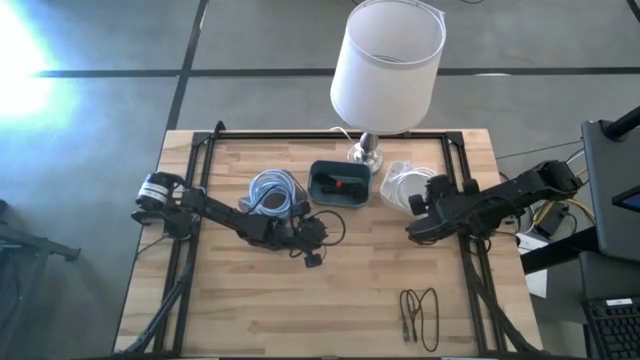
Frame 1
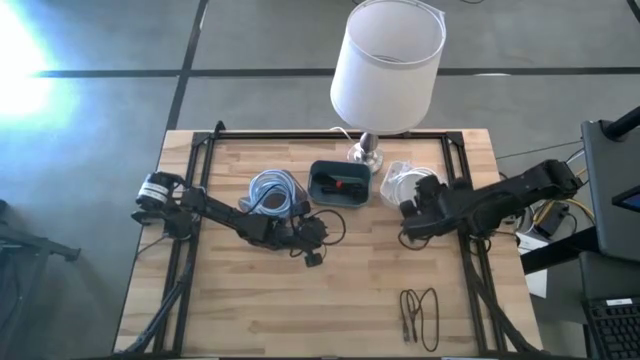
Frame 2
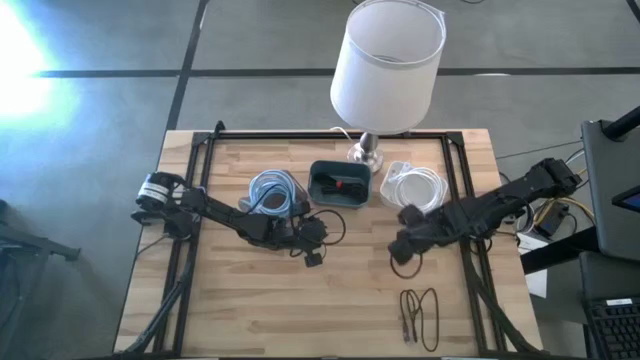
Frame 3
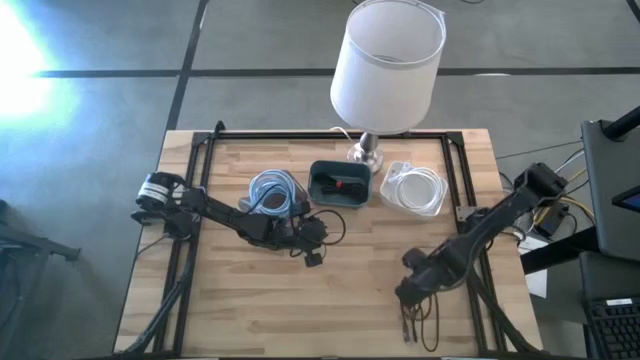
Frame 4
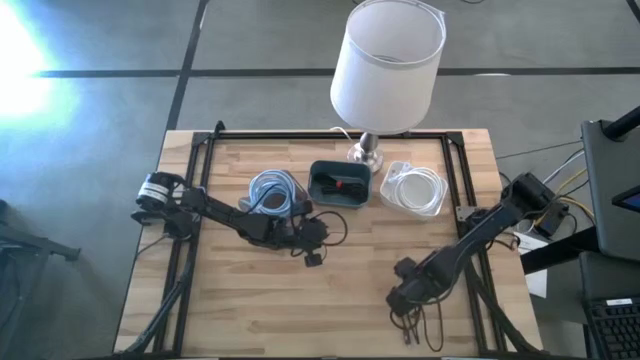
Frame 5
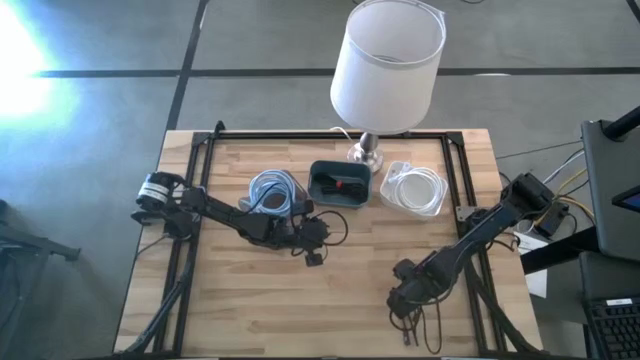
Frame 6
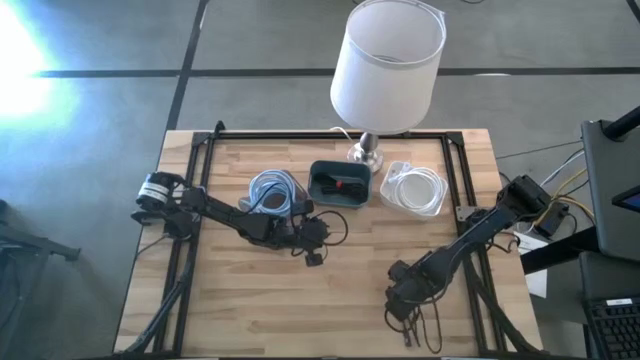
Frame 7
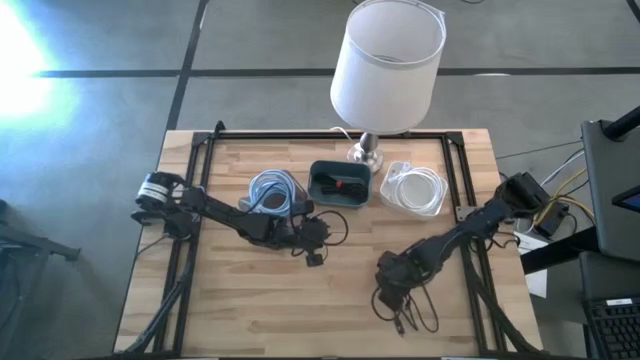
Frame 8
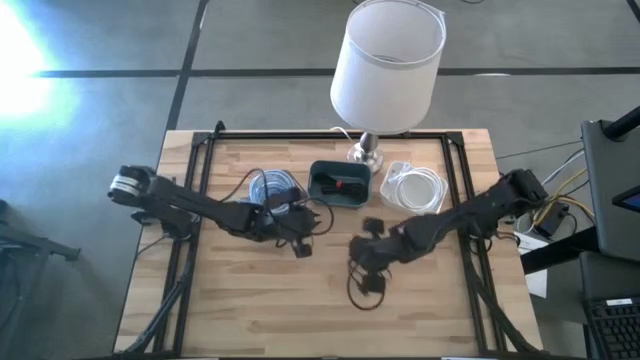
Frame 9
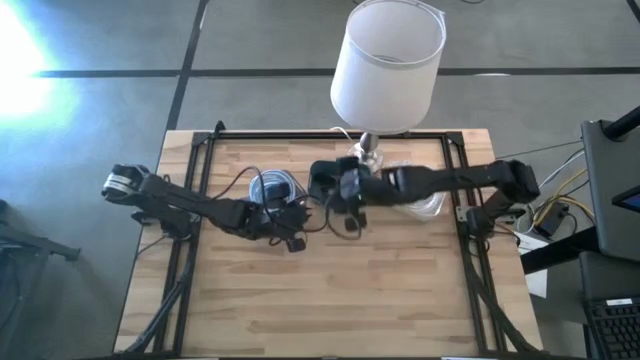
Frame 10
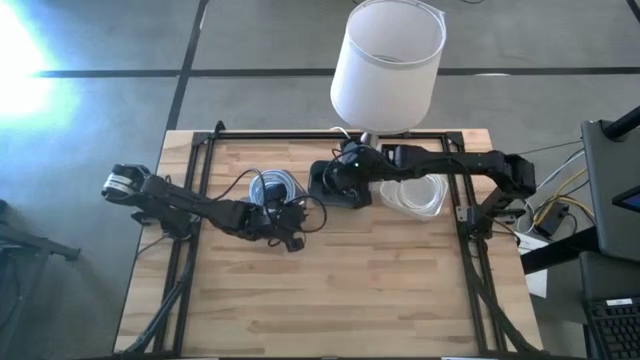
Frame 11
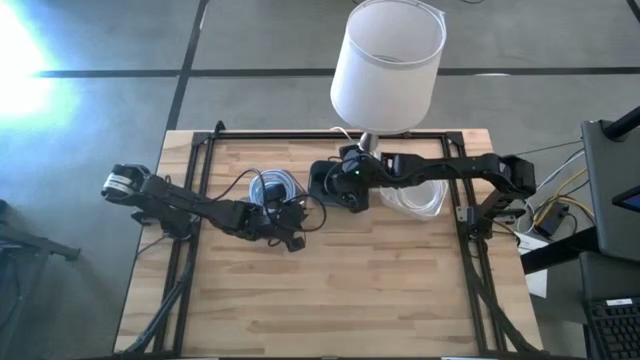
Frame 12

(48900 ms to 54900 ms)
Task: Pick & Place USB Port
Put the black USB cable into the blue bin

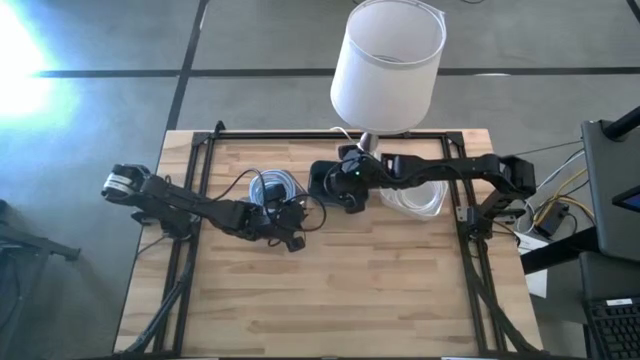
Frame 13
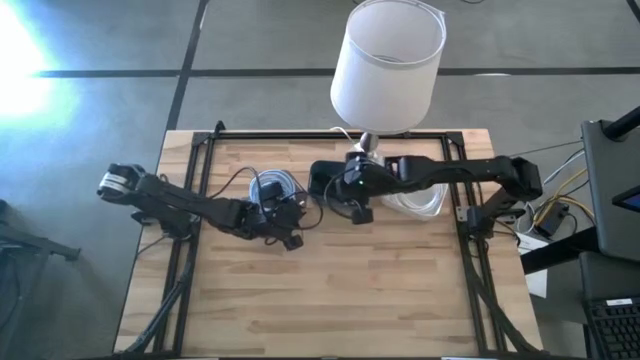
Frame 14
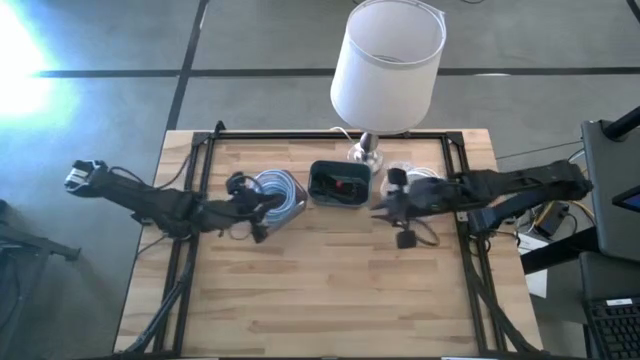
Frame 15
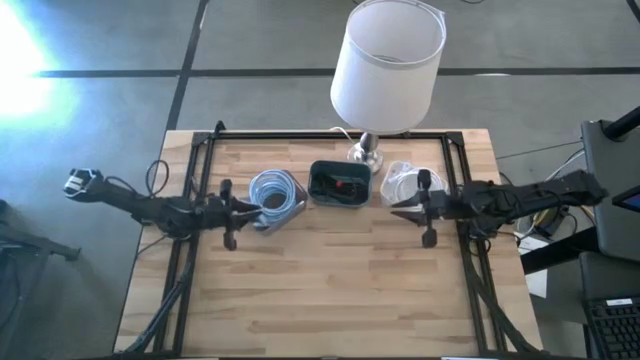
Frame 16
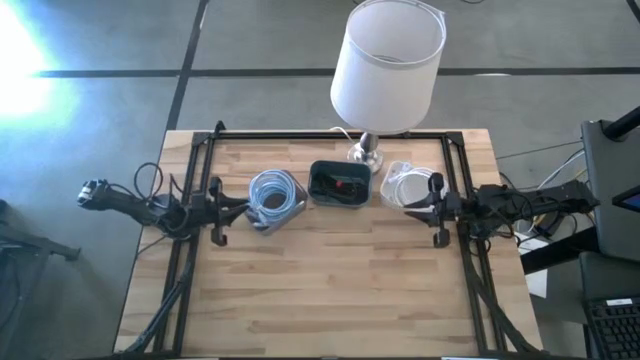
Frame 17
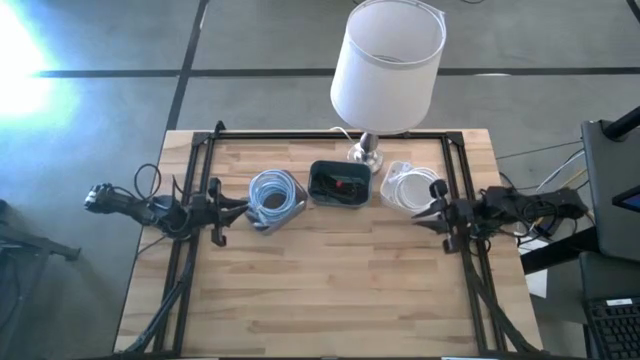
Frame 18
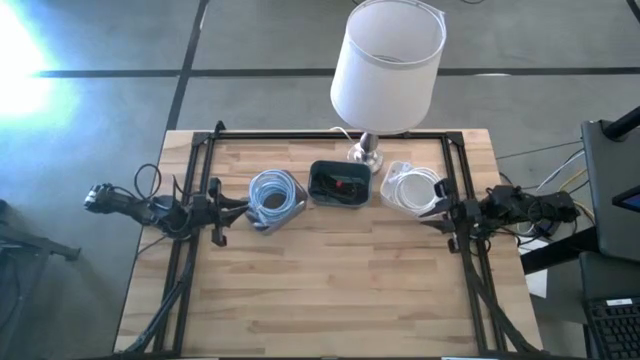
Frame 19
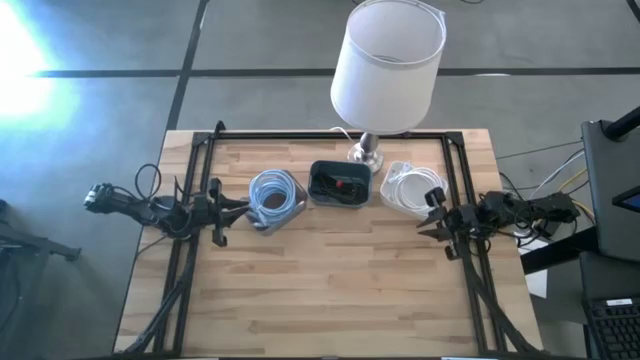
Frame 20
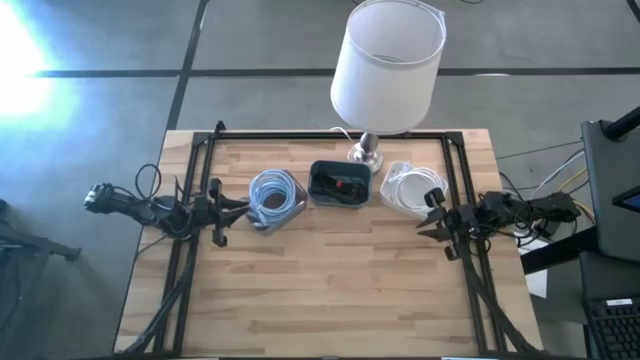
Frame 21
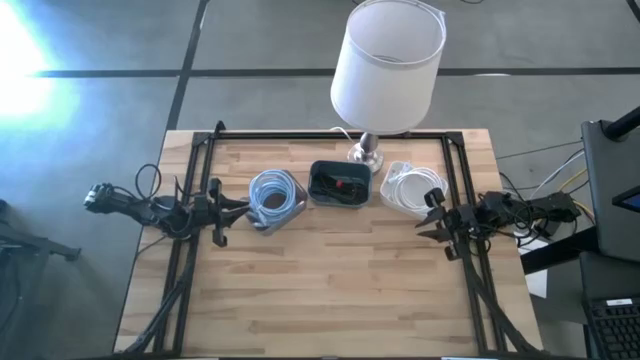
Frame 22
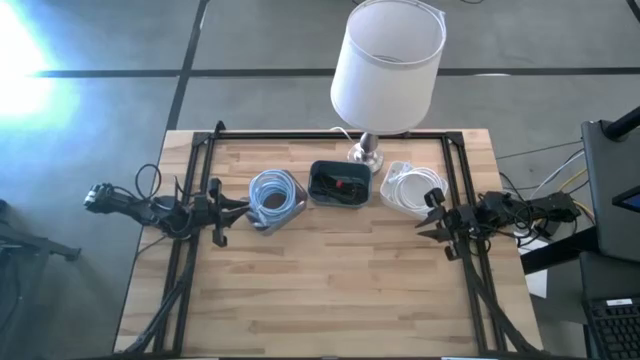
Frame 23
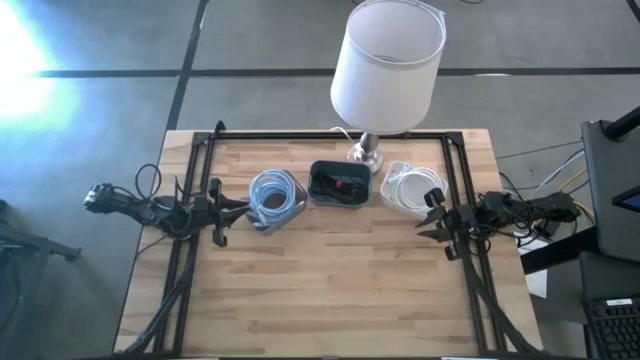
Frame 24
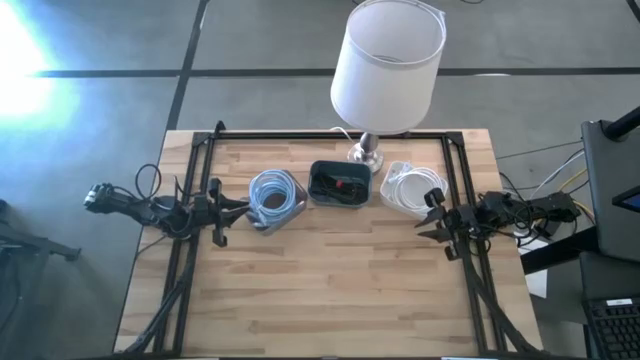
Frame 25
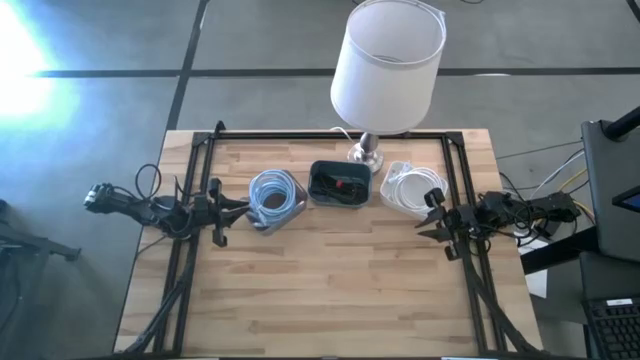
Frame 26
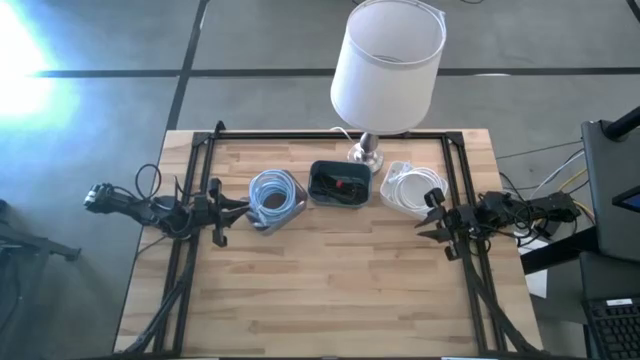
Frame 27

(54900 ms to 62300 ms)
Return to Home Position

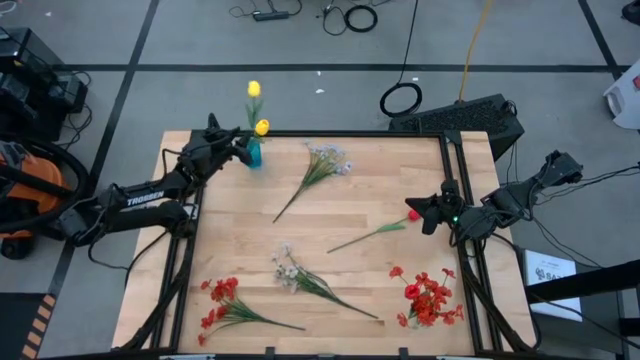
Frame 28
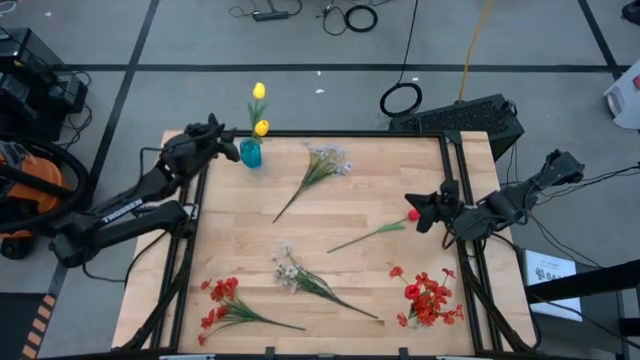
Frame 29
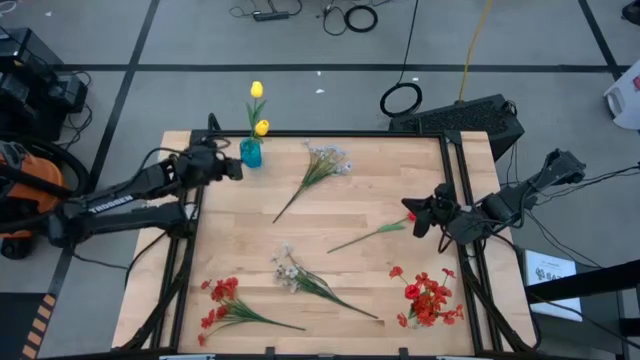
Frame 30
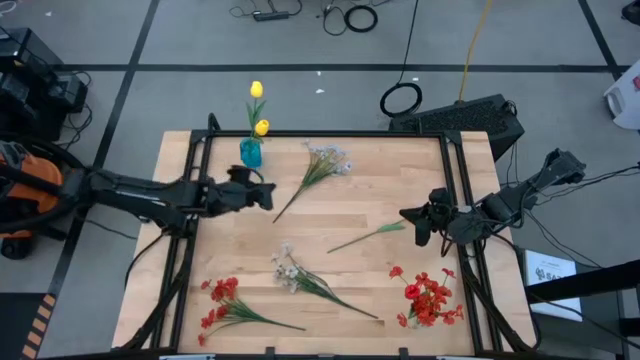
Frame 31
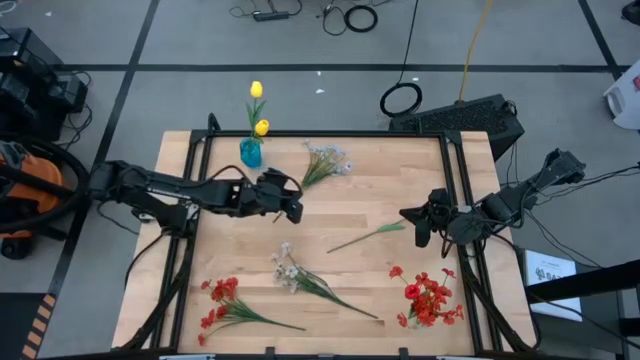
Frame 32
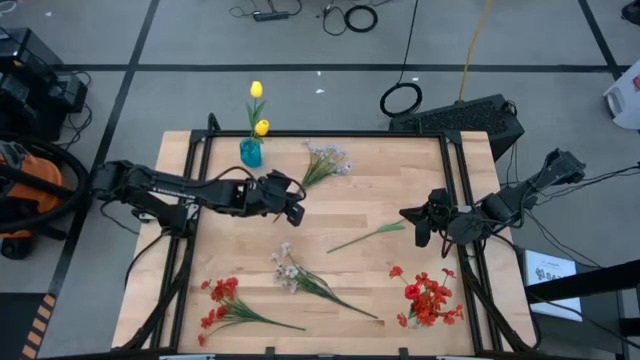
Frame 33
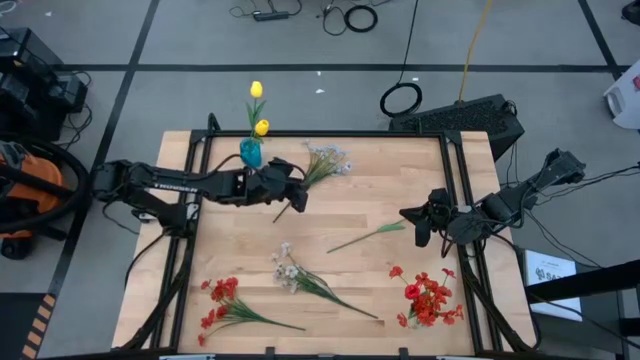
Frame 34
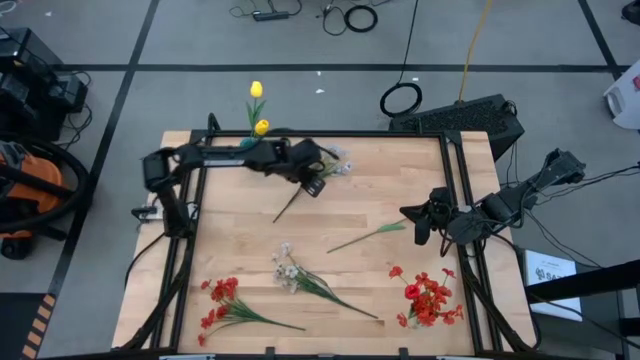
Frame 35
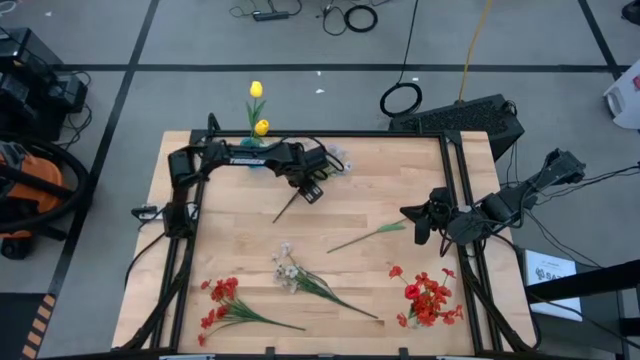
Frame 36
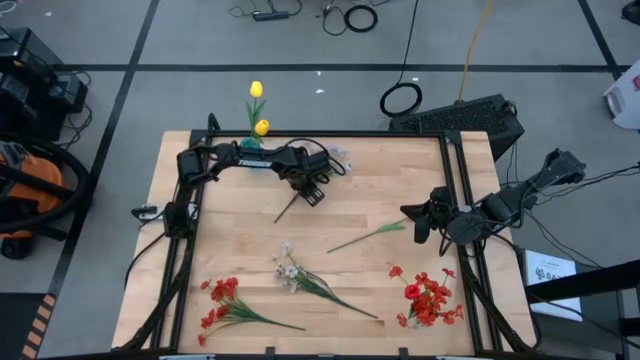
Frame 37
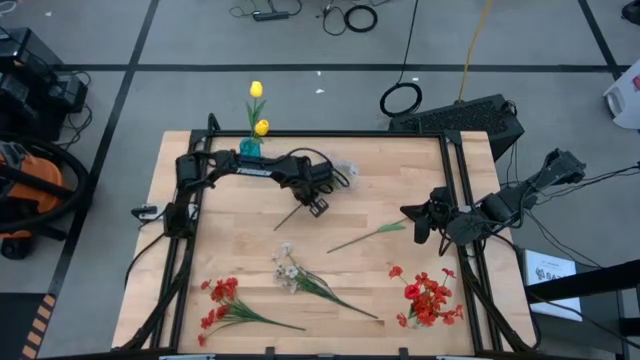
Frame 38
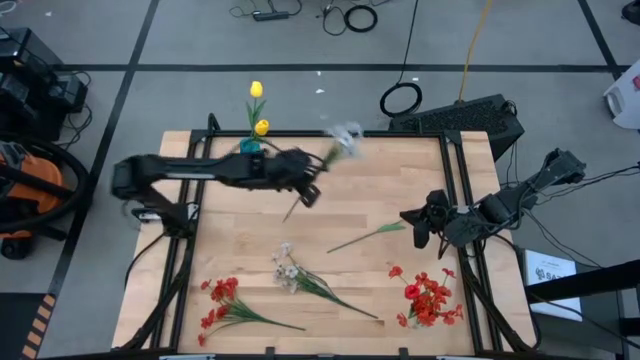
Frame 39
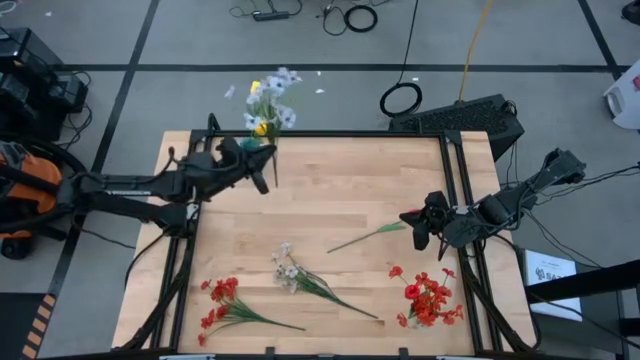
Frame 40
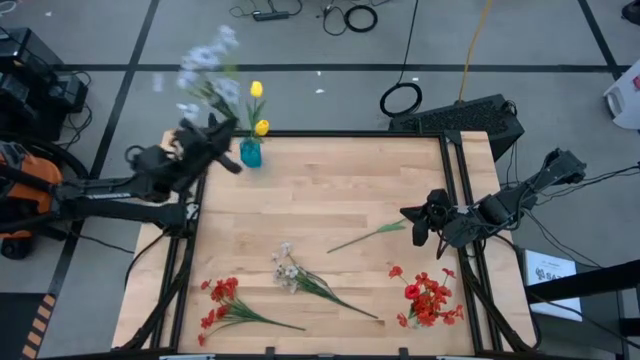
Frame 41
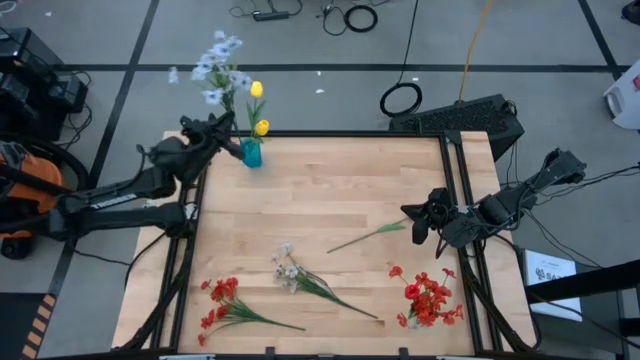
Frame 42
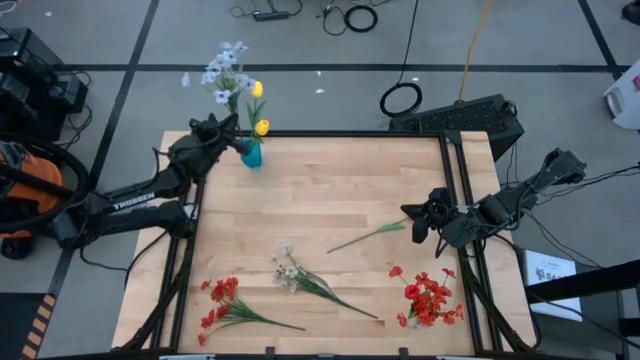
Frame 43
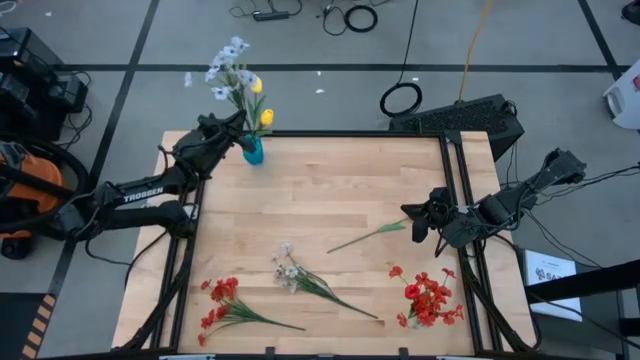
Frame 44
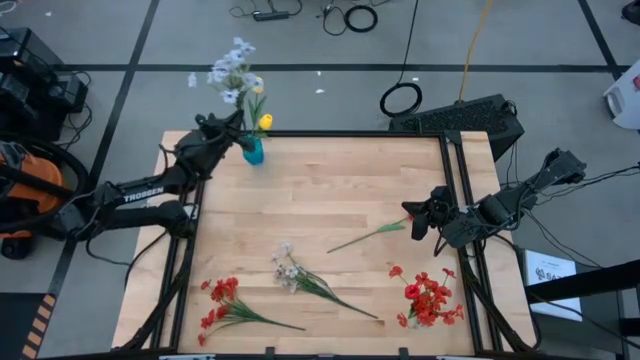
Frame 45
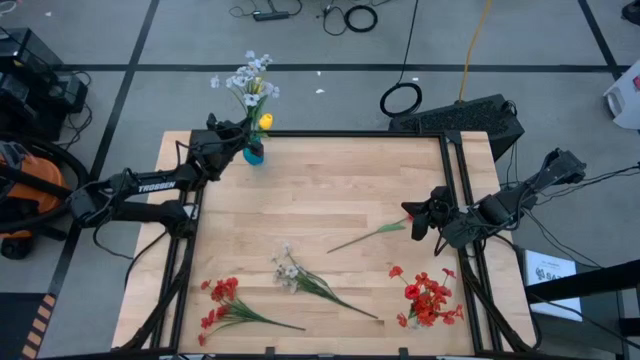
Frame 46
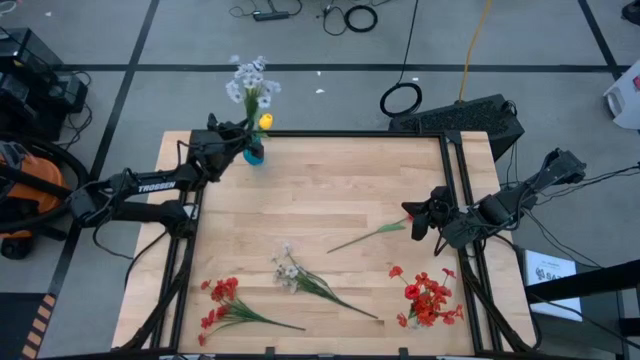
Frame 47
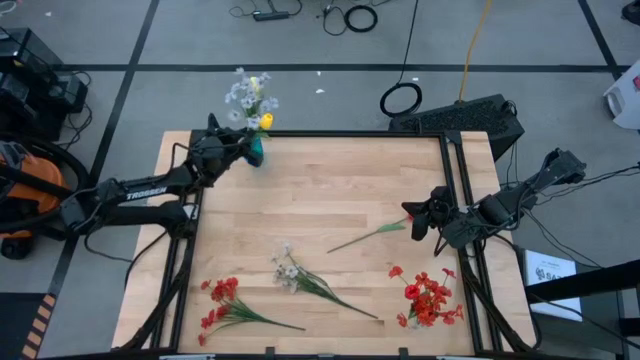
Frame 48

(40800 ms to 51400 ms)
Task: Sort flowers into vase by color
Put the top white flowers into the blue vase
